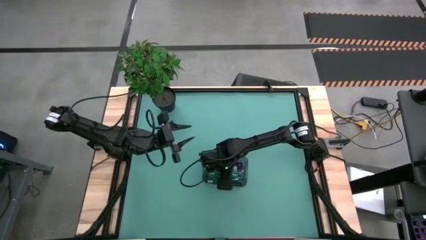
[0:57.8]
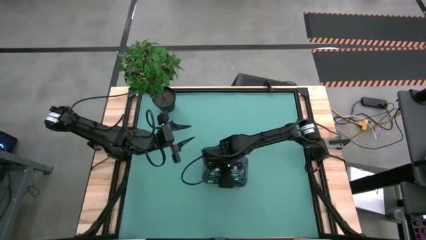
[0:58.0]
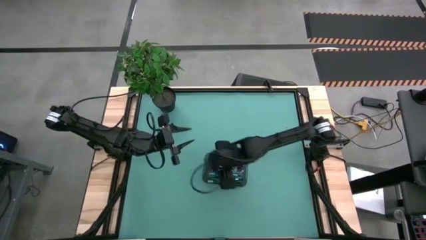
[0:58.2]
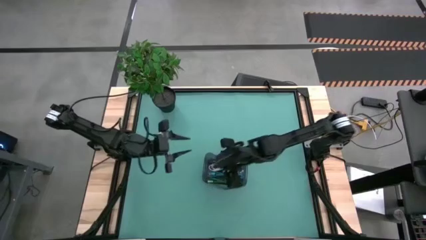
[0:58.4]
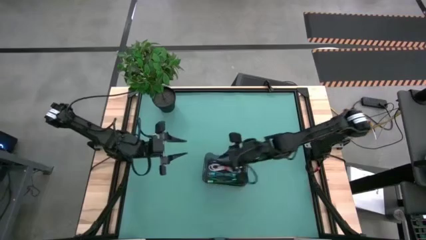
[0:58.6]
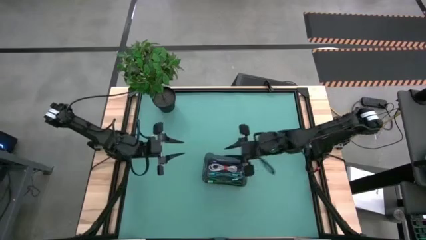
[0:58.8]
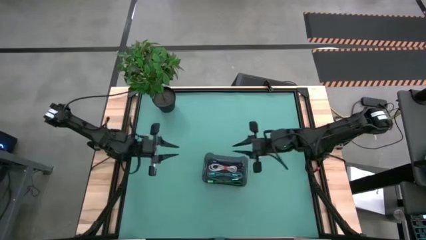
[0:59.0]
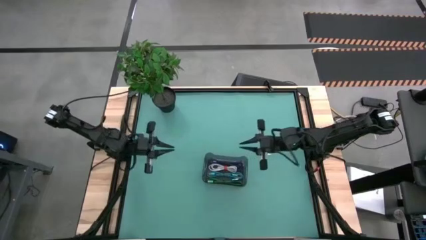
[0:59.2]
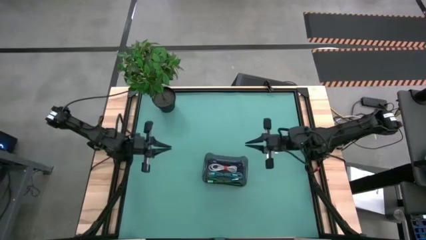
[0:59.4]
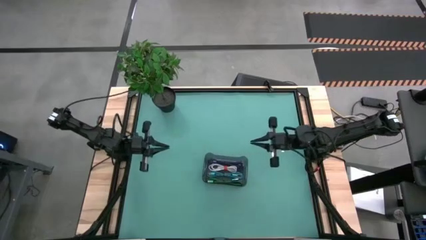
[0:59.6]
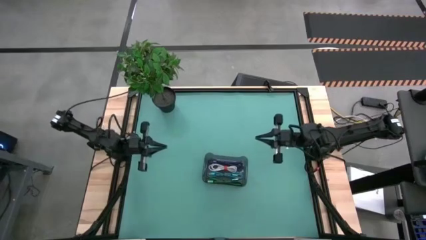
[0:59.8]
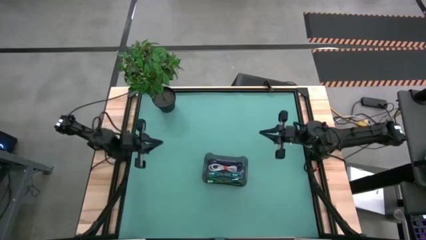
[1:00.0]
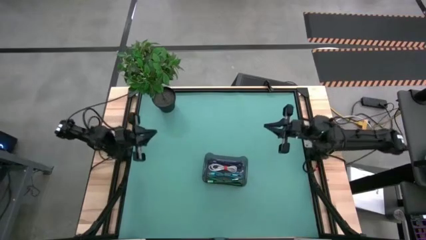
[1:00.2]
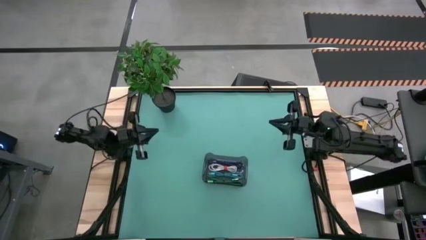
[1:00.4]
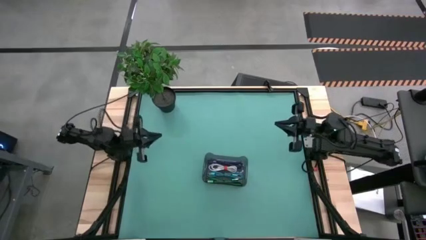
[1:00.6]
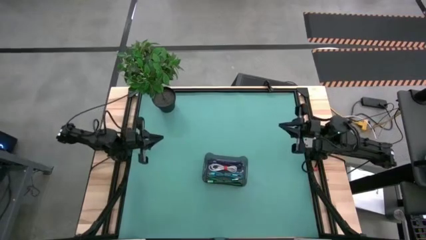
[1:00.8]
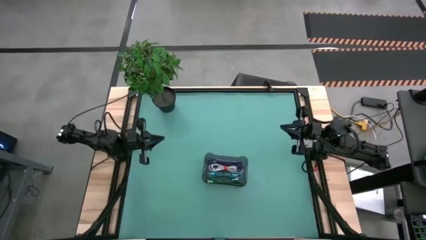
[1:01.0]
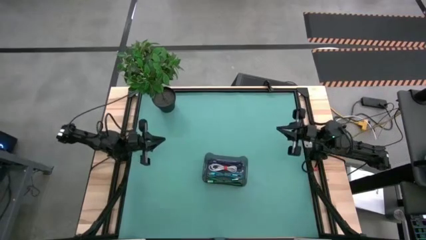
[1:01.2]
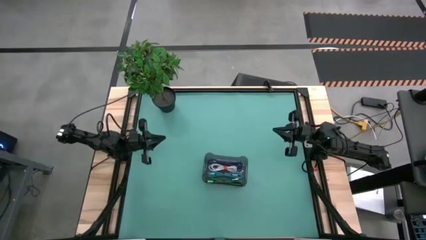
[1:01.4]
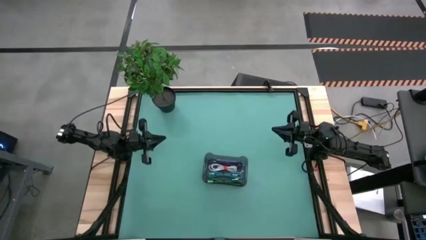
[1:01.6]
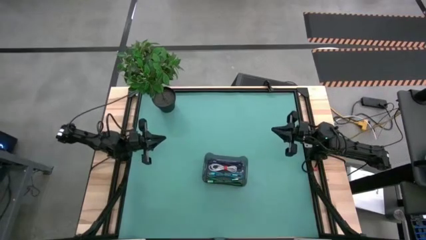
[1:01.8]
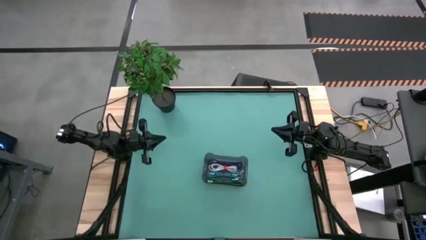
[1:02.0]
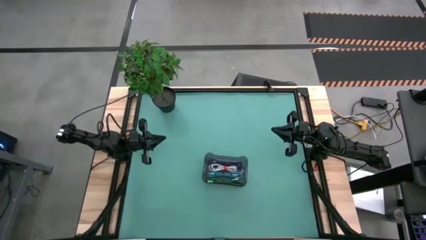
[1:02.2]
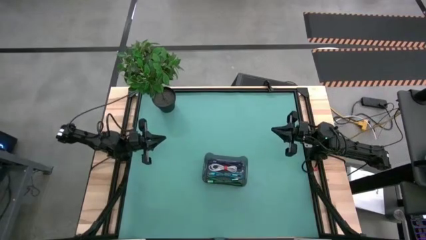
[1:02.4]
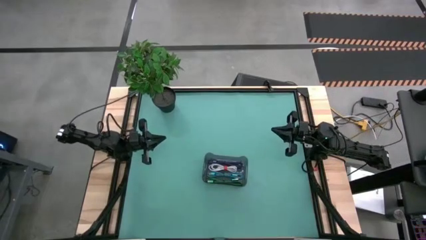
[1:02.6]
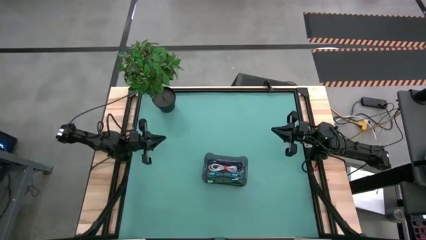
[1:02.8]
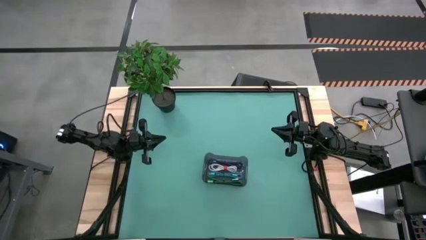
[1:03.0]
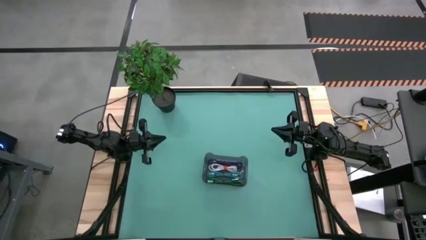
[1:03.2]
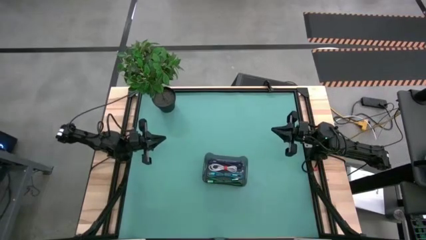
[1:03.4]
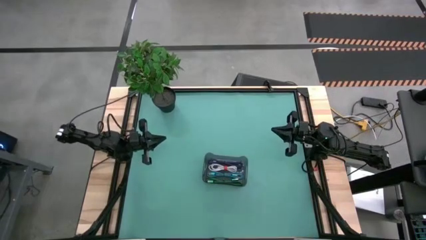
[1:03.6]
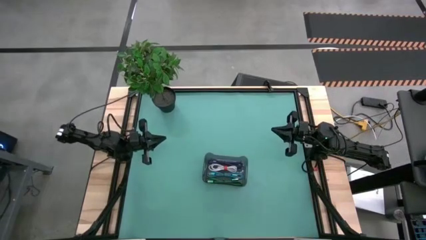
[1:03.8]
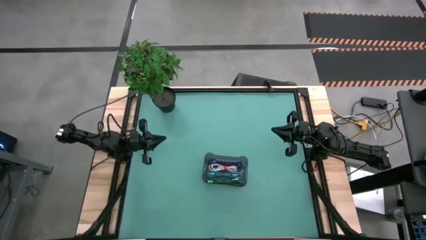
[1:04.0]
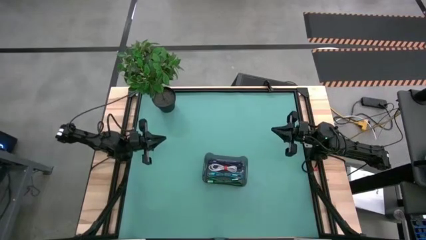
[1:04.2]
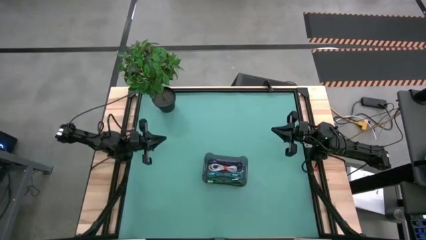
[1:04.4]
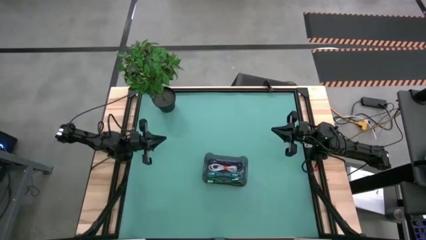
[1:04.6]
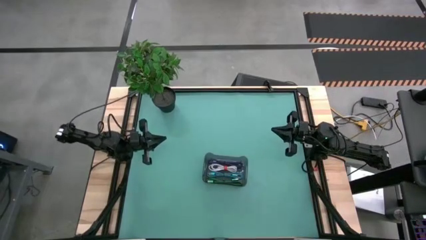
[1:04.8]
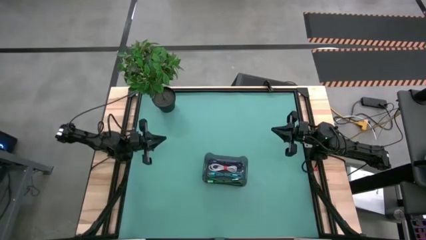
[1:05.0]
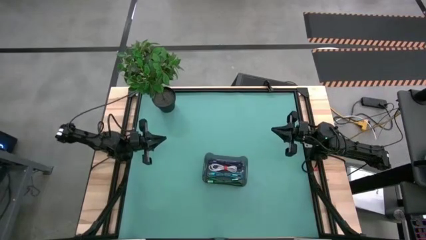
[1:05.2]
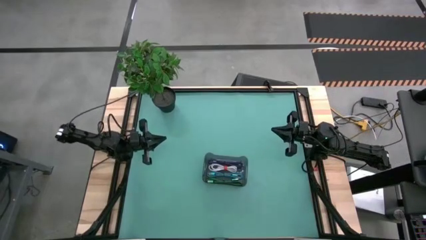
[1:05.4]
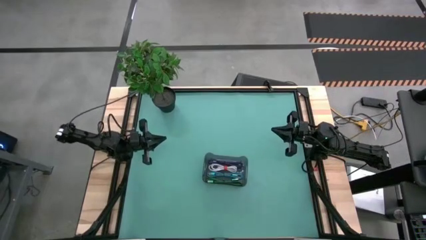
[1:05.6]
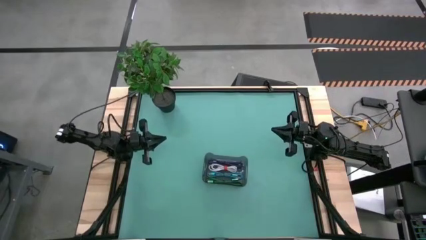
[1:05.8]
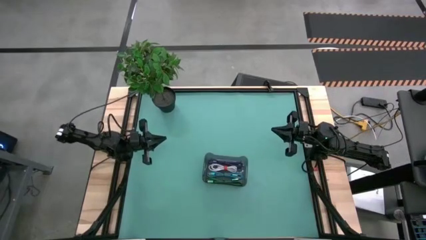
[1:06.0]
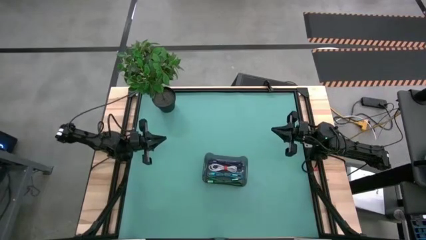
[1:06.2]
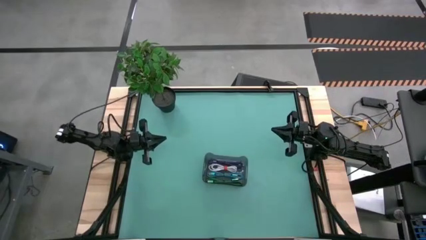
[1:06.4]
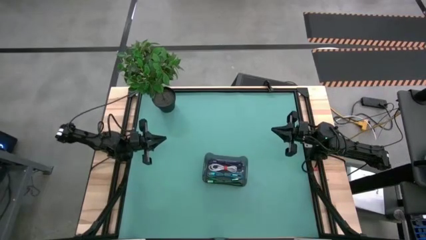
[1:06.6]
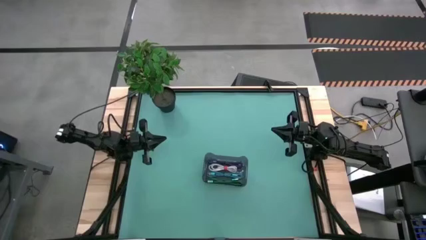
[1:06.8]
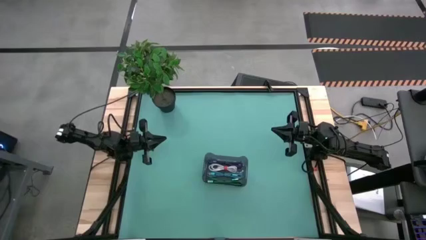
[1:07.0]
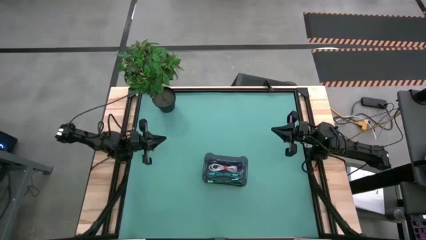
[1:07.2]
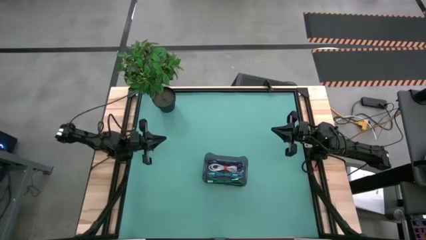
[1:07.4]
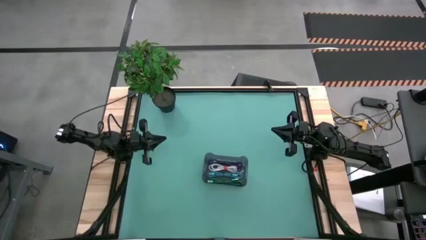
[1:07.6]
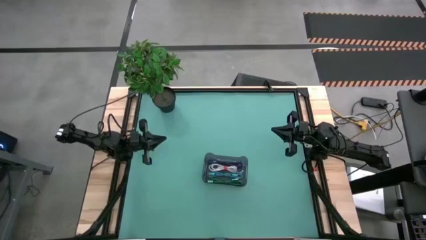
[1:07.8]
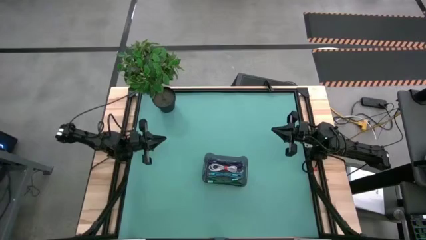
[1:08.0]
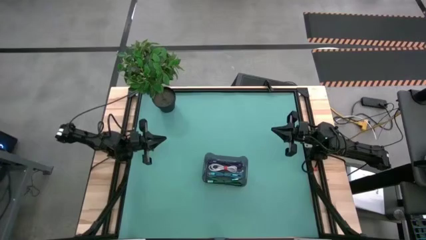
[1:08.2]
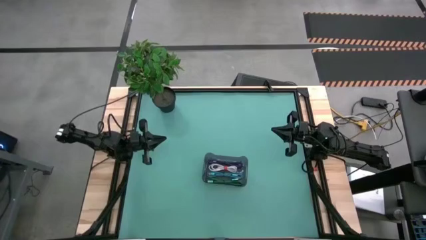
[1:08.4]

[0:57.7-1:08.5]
Task: Pick and place USB-C Cables
Return to Home Position

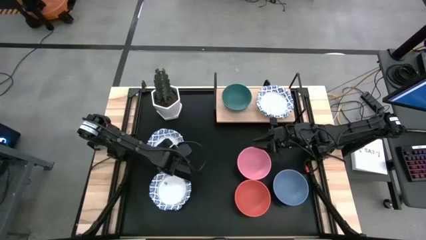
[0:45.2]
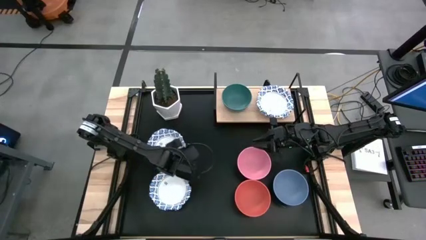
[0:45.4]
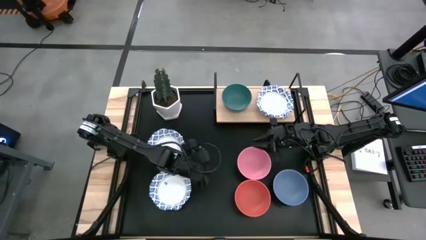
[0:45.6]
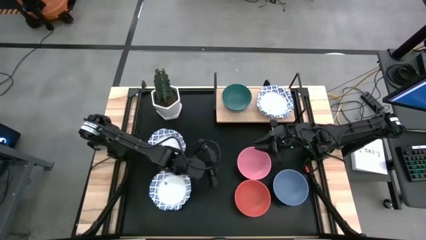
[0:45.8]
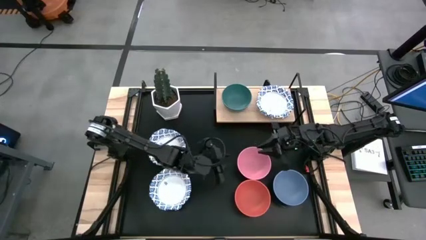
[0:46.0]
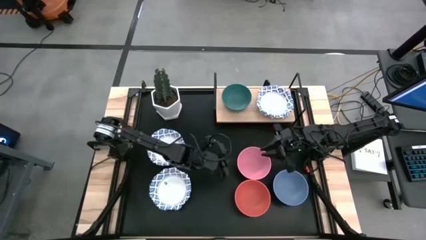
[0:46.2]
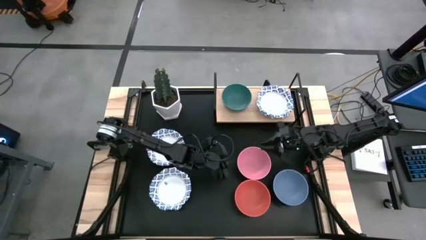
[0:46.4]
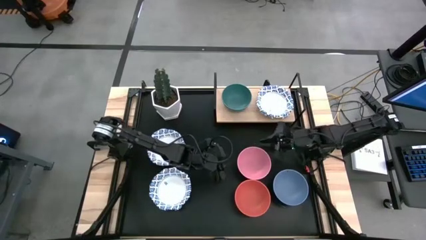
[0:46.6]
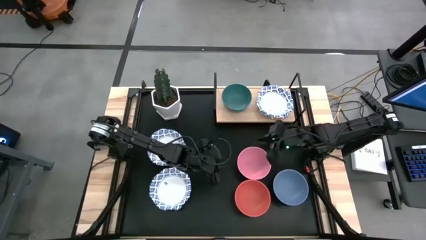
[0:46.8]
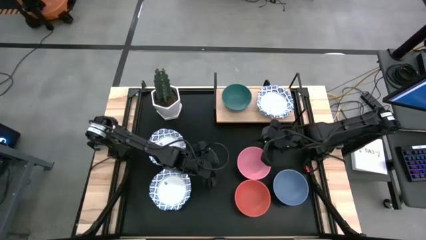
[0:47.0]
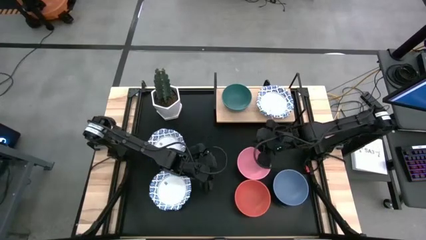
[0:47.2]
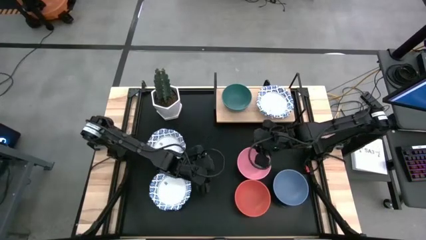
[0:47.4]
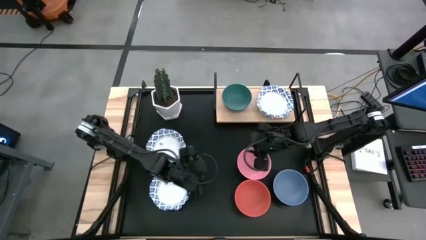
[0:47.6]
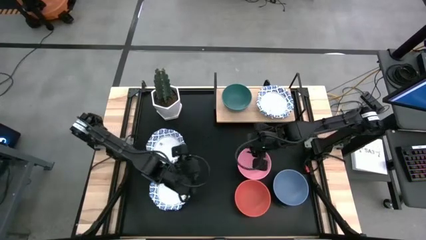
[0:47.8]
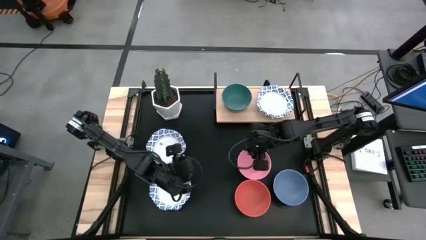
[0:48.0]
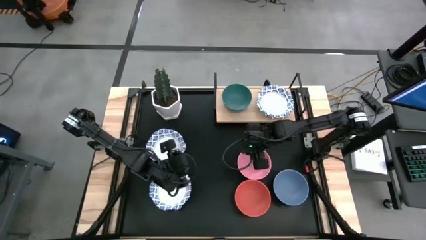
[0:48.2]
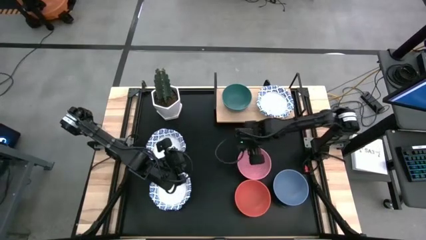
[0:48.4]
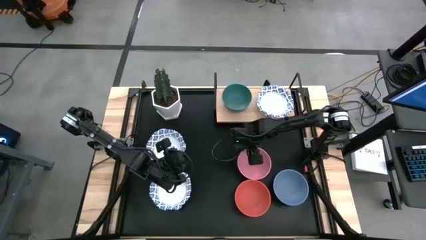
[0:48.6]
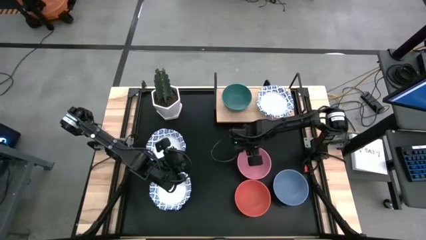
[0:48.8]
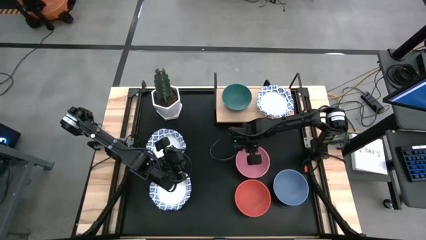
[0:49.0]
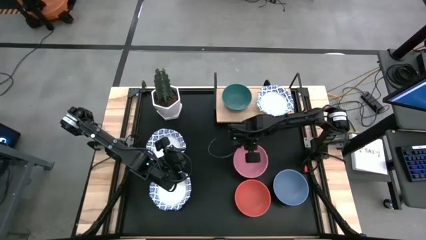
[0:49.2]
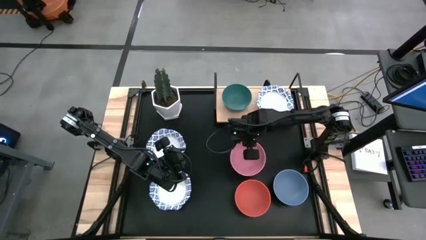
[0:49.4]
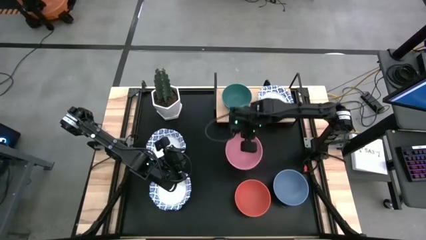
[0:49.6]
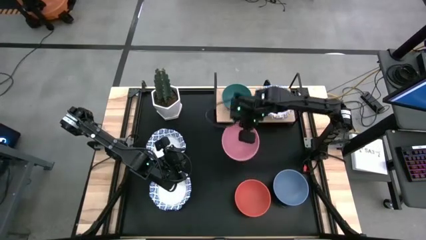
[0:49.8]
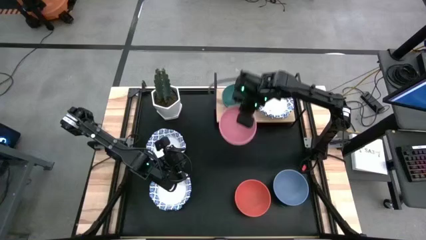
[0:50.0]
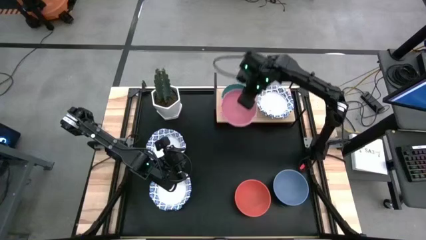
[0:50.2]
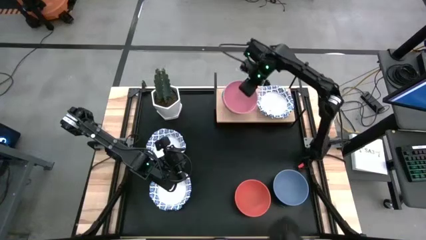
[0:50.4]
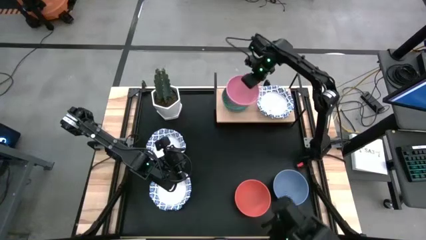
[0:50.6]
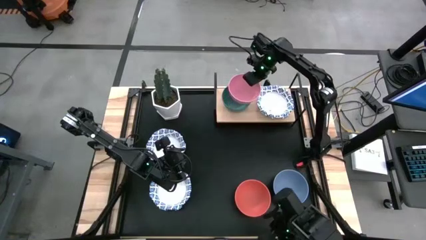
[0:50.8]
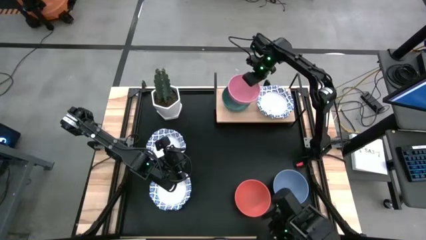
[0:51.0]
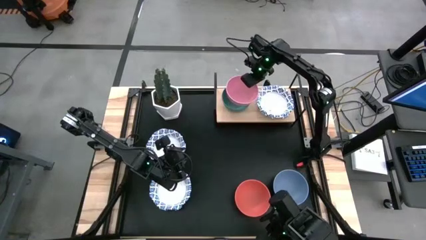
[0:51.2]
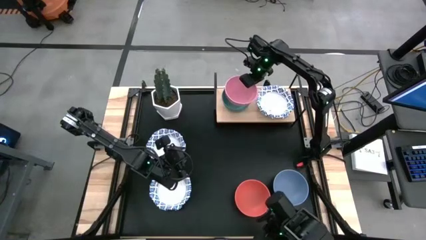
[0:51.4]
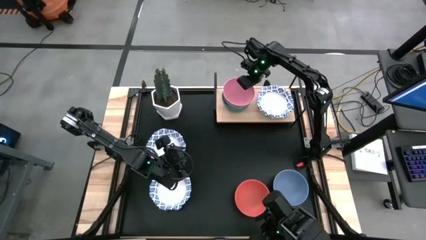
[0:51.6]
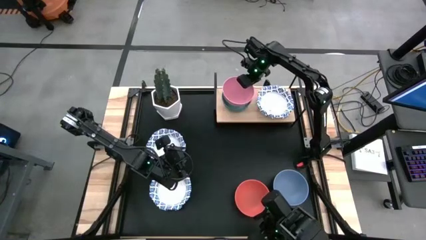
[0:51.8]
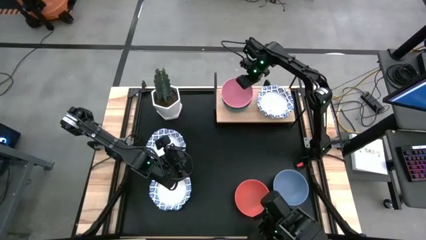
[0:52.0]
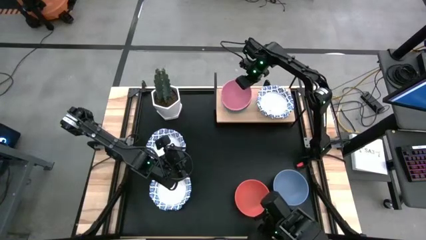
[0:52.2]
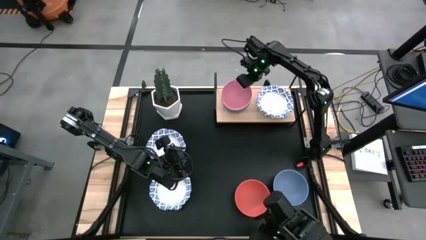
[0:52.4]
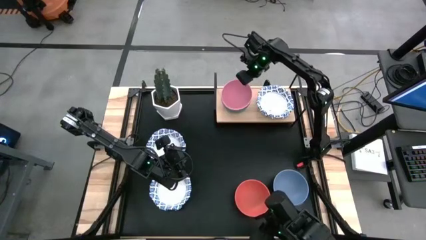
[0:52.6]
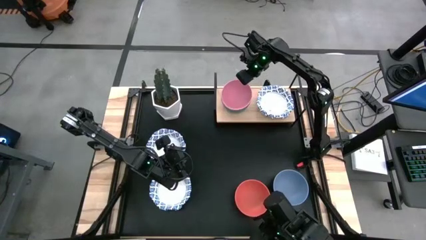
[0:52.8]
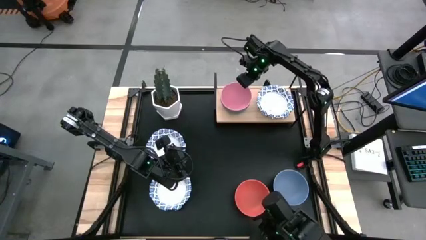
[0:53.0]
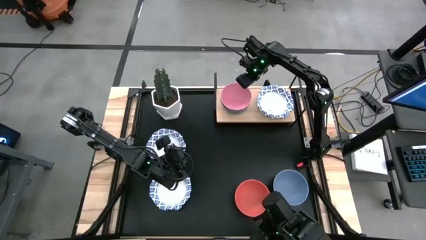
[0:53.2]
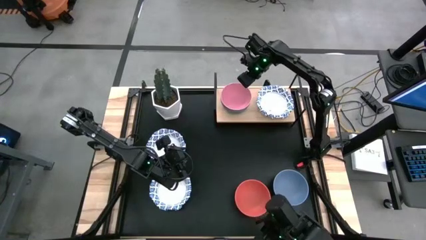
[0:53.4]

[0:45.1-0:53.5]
Task: Place and stack bowls onto a shelf
Stack the pink bowl on top of the green bowl on the shelf
